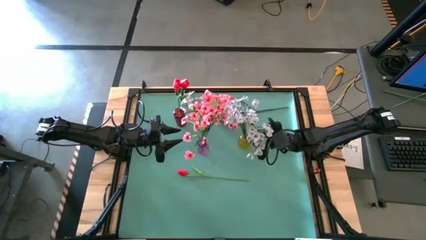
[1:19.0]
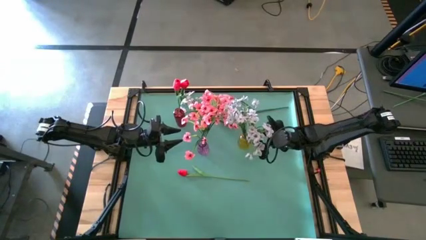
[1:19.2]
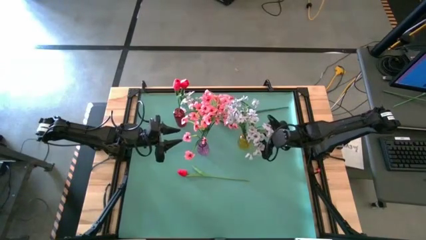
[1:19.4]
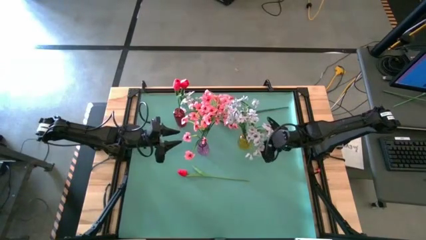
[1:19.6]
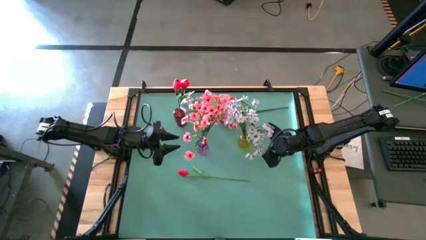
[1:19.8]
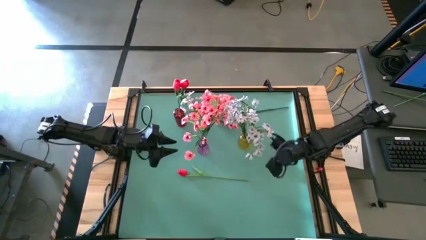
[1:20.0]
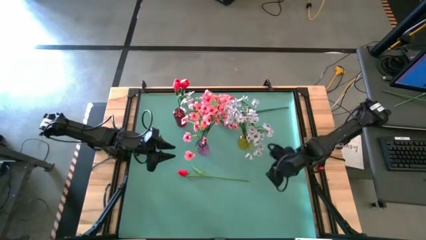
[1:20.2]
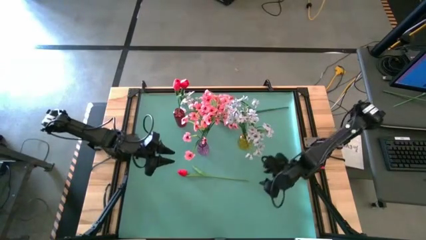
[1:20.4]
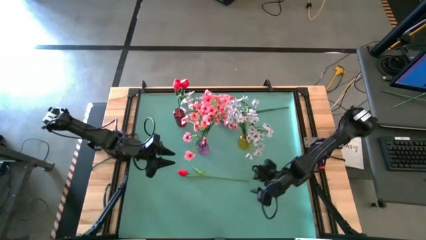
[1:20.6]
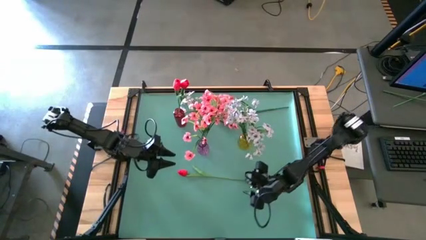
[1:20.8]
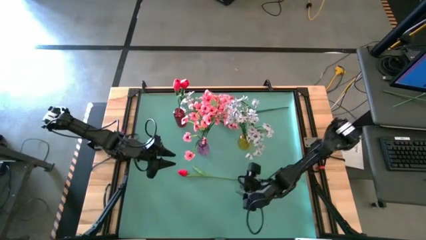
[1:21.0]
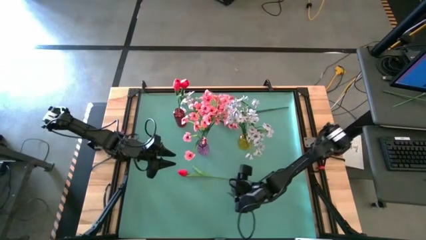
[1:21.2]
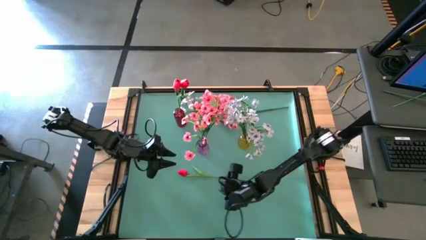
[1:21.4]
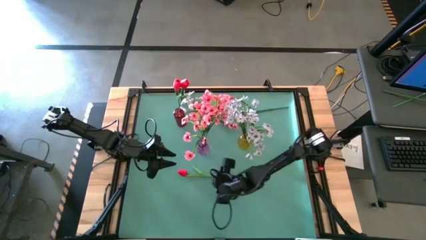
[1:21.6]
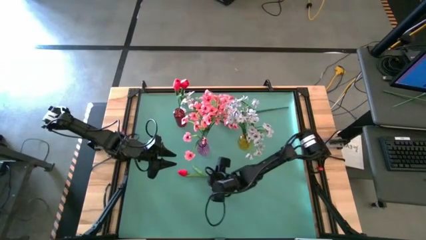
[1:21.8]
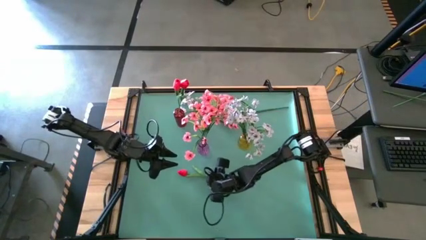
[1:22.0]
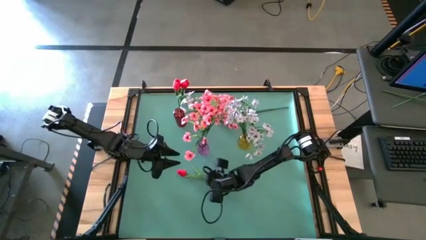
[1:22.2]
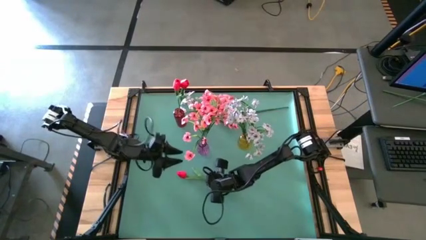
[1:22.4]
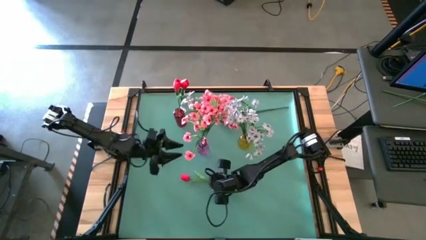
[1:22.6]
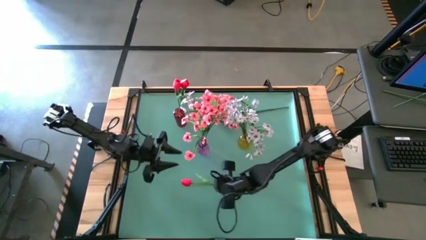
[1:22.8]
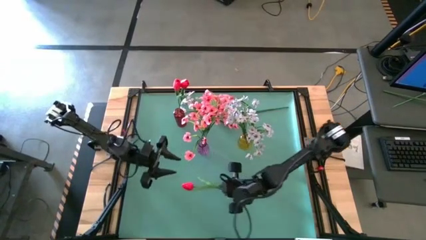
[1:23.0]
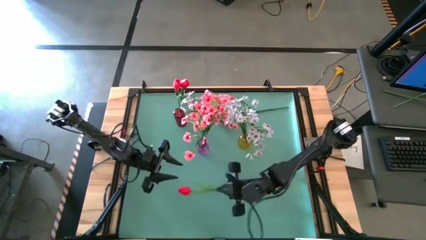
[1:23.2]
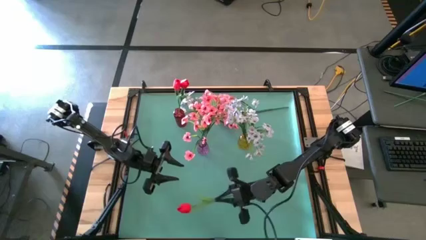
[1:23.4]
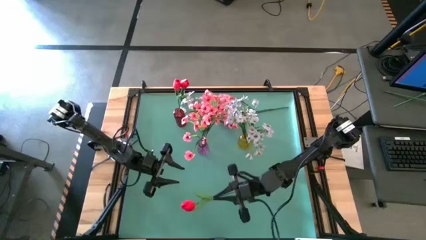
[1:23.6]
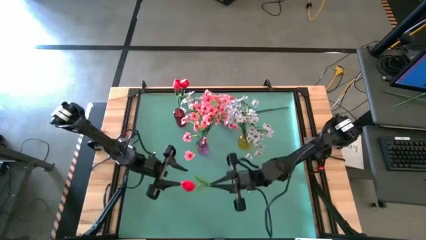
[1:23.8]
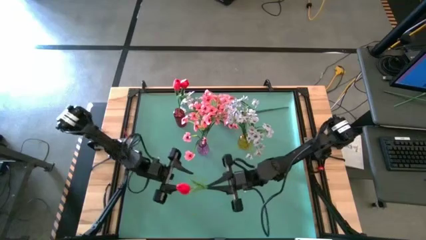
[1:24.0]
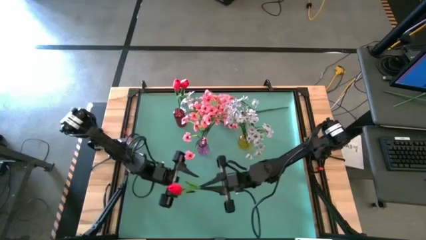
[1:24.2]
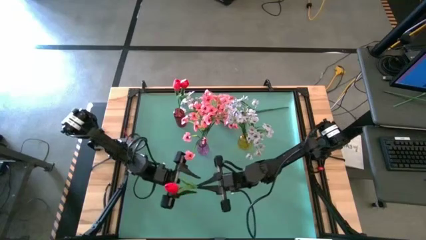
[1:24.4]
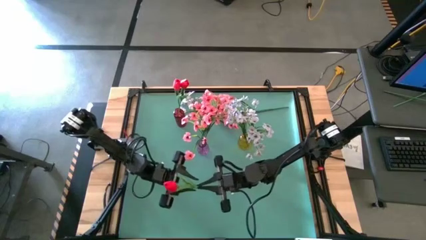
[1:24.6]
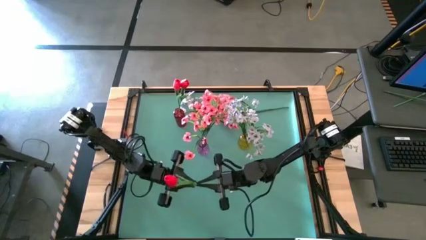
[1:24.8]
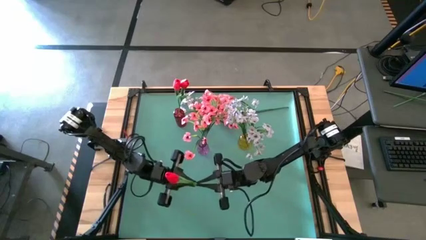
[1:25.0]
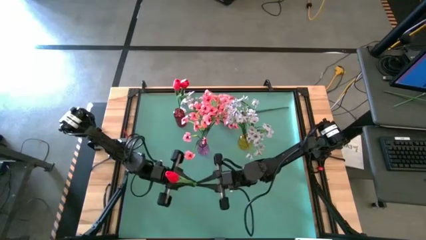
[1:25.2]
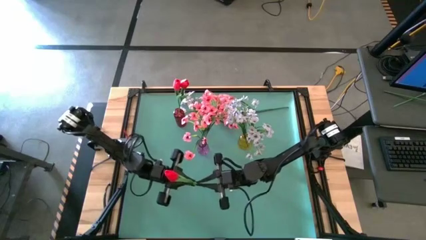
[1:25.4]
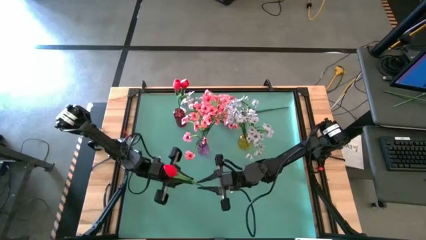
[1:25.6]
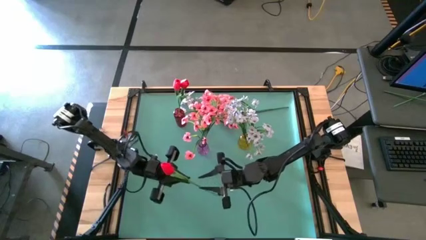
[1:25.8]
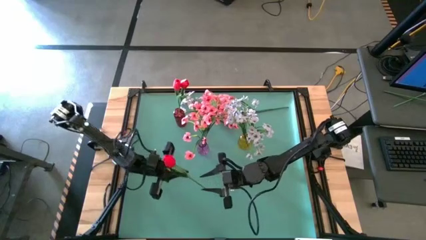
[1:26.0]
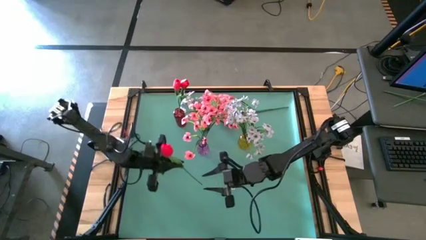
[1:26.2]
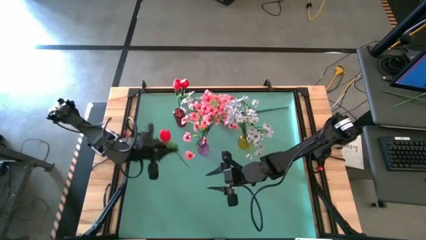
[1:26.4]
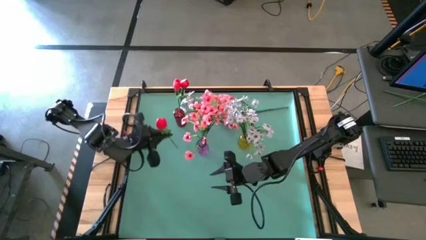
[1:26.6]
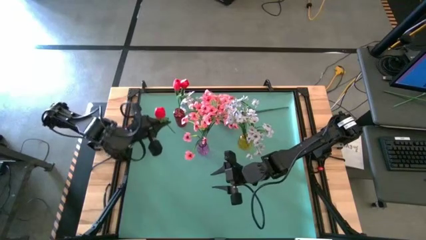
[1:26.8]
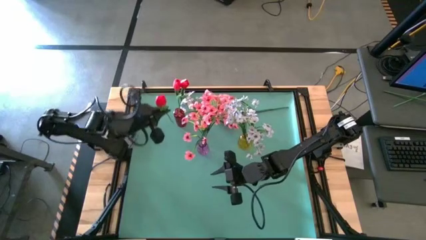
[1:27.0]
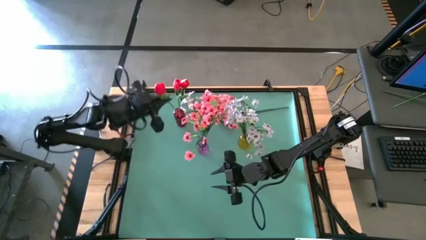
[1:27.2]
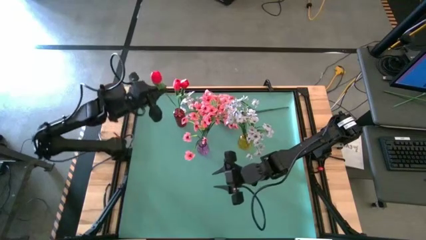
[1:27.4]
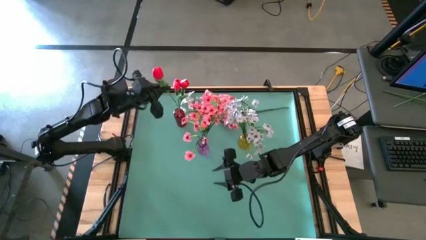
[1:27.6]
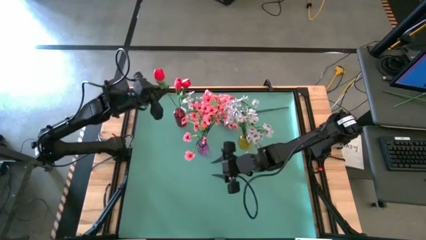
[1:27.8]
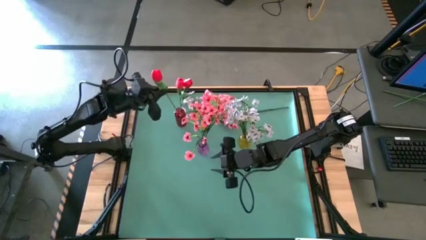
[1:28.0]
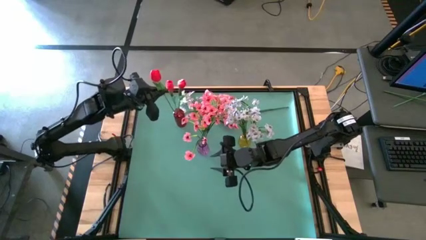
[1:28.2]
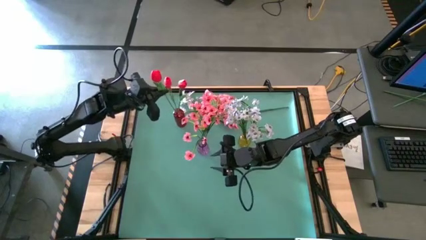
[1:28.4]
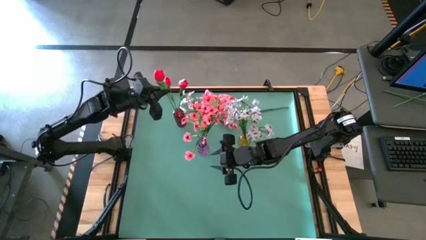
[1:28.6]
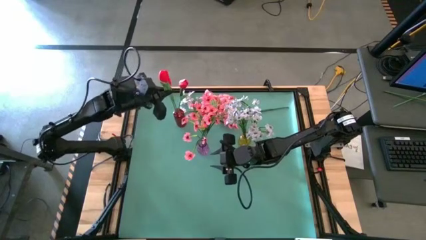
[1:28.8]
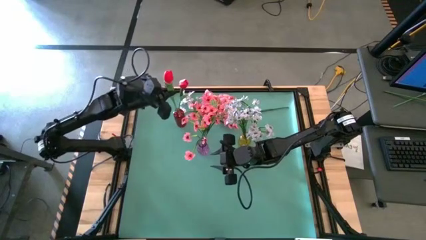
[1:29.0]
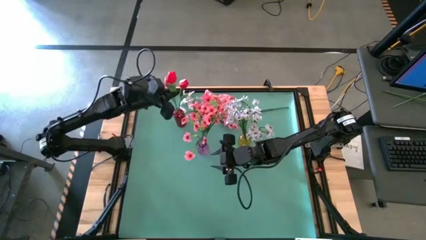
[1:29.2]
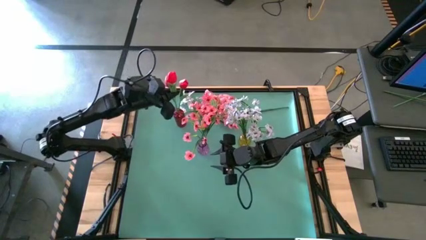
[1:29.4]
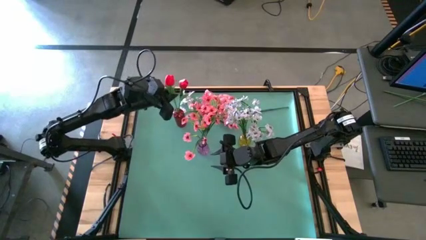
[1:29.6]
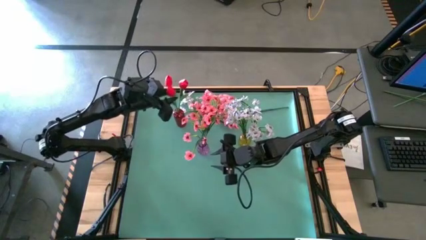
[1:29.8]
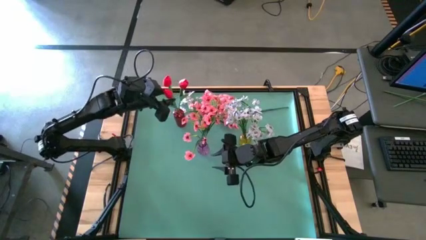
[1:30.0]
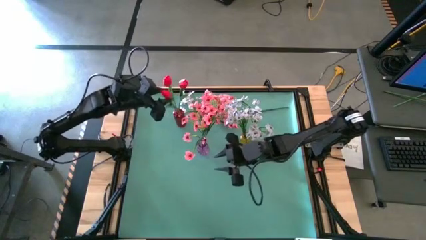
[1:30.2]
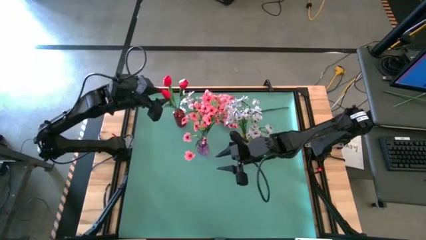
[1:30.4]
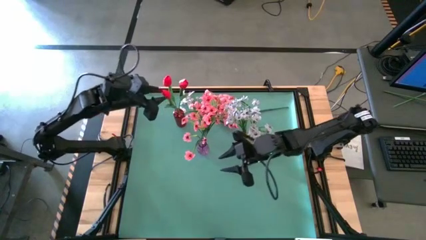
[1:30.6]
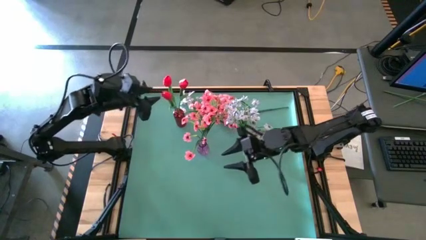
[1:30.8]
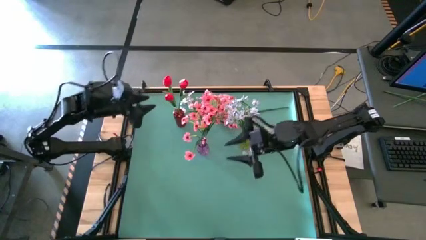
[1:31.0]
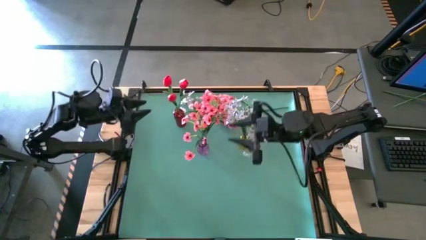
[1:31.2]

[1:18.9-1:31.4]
Task: Sort flowers into vase by color
Put the red flower into the red vase
